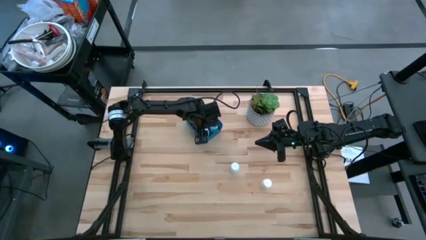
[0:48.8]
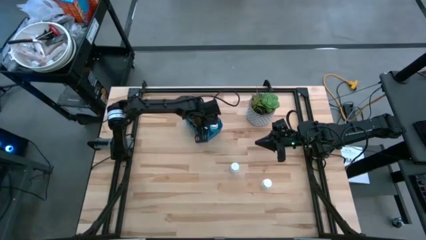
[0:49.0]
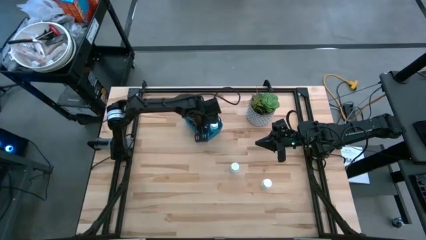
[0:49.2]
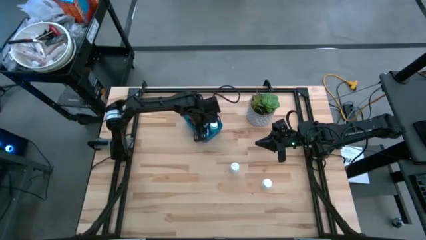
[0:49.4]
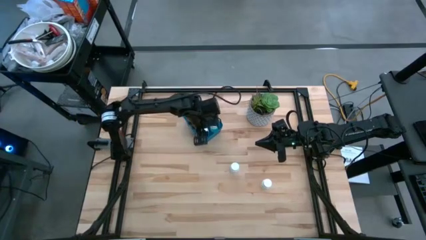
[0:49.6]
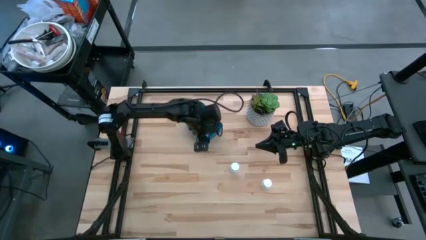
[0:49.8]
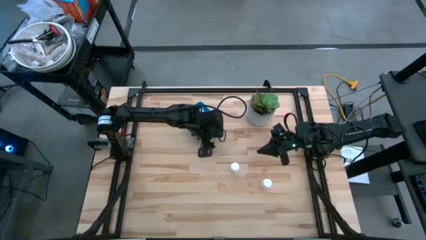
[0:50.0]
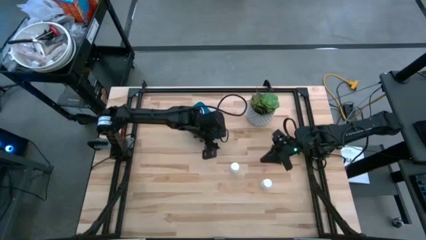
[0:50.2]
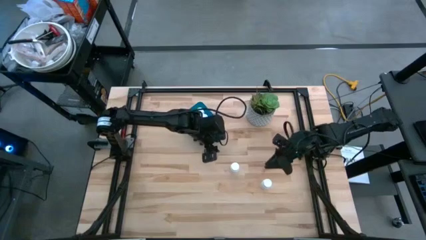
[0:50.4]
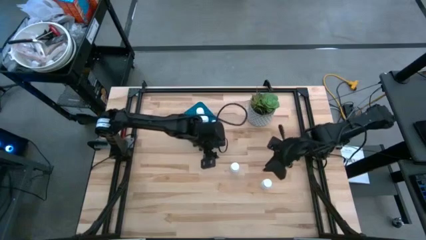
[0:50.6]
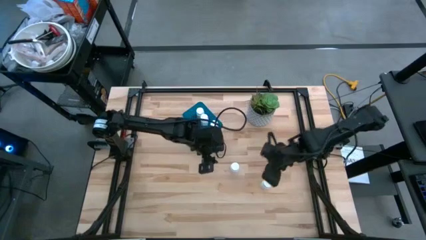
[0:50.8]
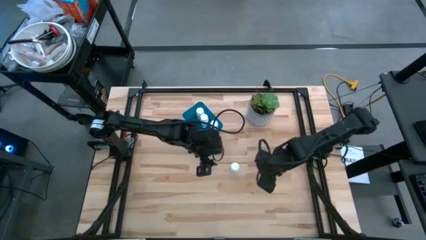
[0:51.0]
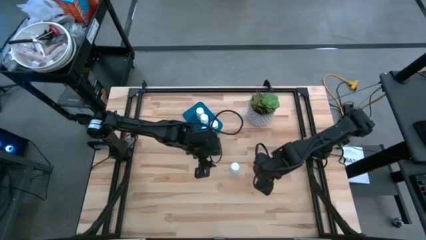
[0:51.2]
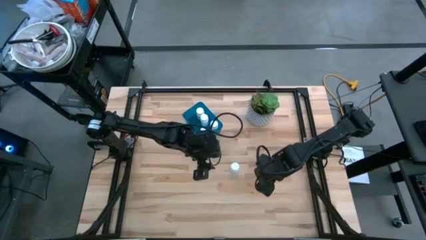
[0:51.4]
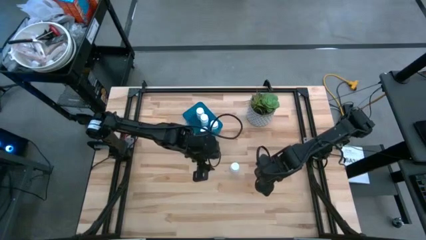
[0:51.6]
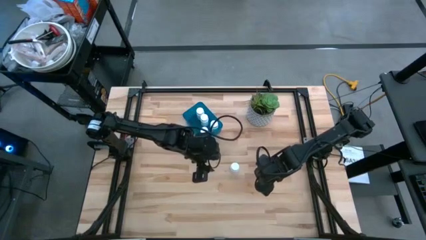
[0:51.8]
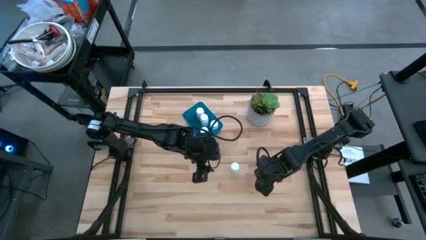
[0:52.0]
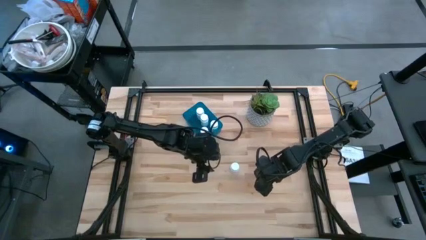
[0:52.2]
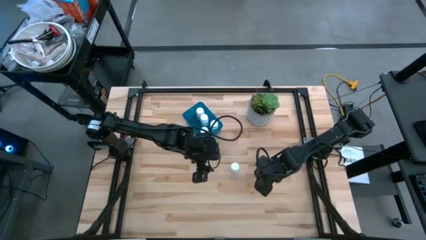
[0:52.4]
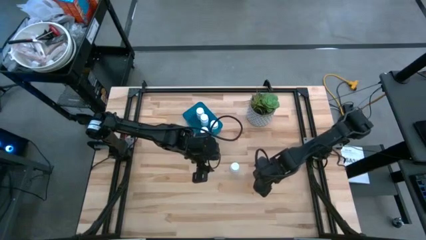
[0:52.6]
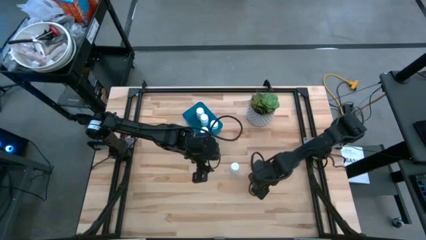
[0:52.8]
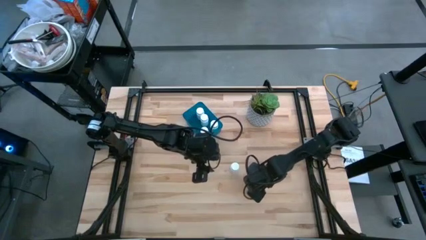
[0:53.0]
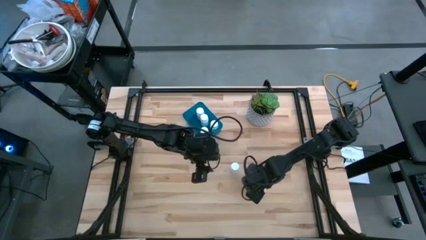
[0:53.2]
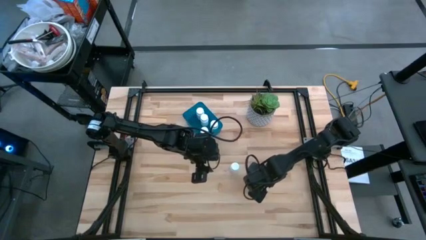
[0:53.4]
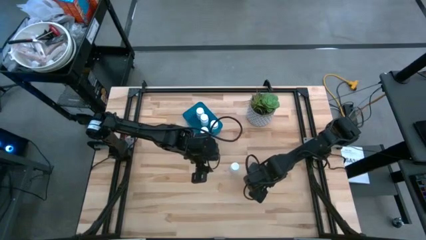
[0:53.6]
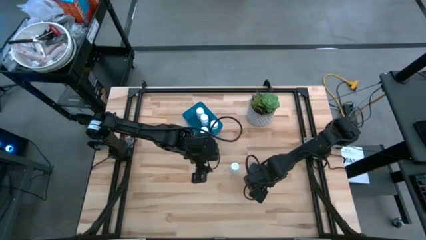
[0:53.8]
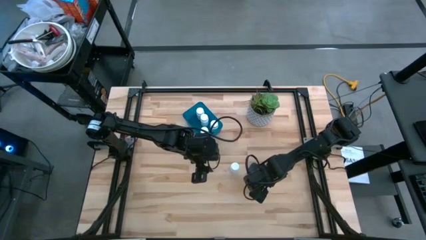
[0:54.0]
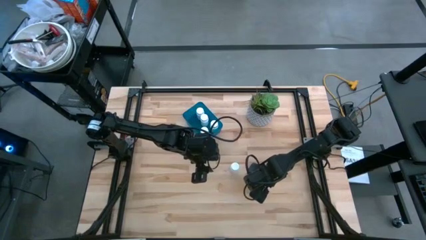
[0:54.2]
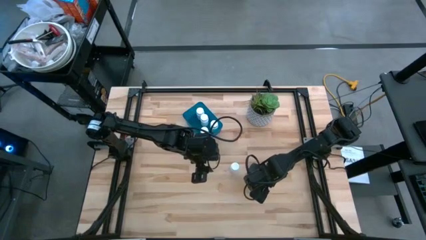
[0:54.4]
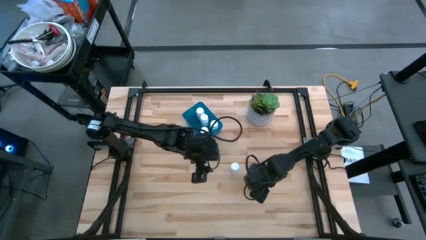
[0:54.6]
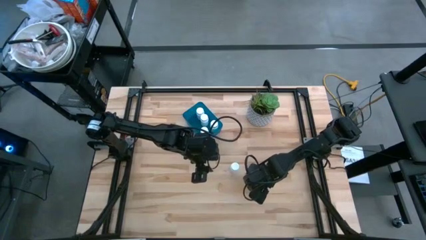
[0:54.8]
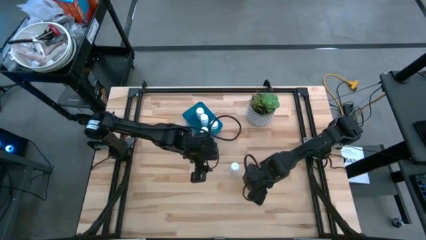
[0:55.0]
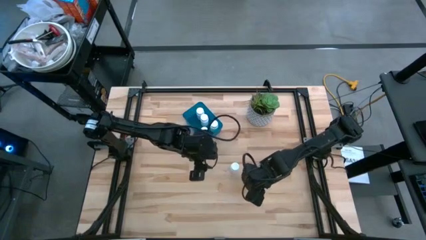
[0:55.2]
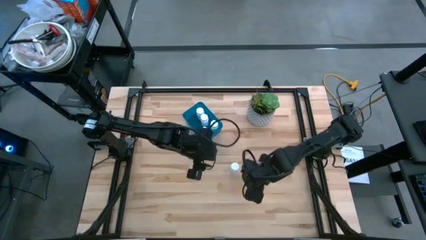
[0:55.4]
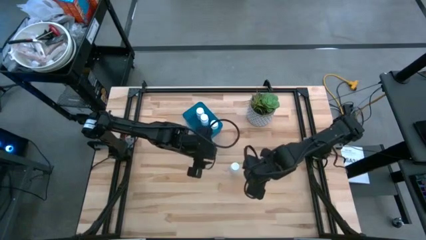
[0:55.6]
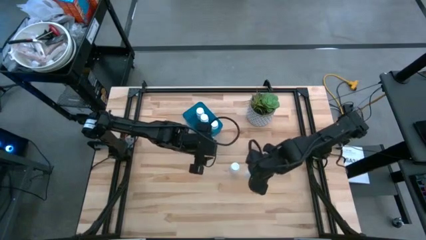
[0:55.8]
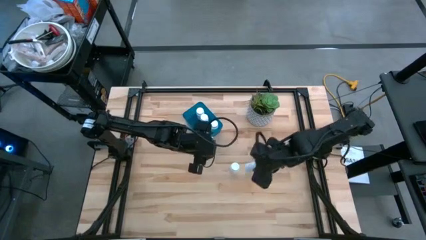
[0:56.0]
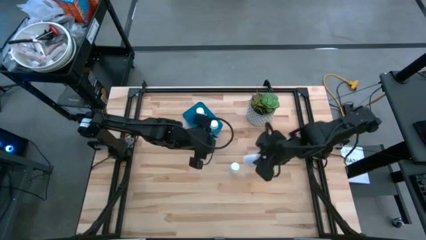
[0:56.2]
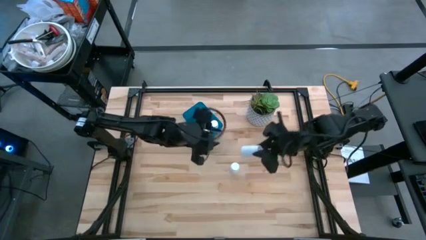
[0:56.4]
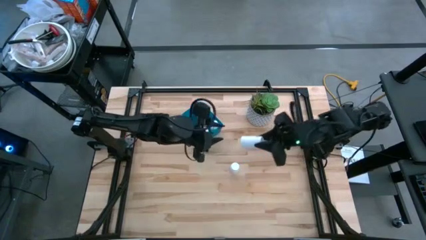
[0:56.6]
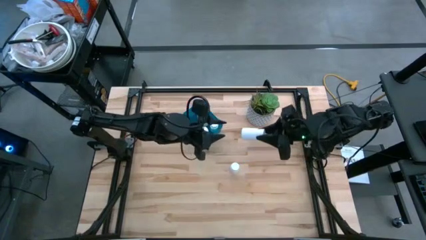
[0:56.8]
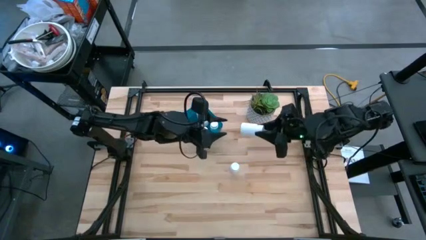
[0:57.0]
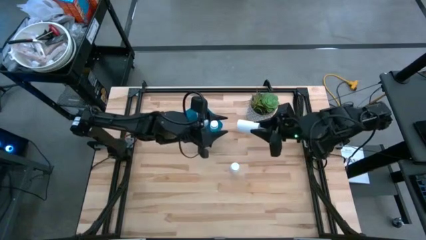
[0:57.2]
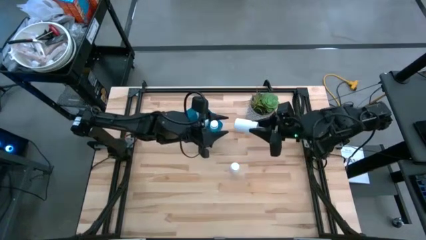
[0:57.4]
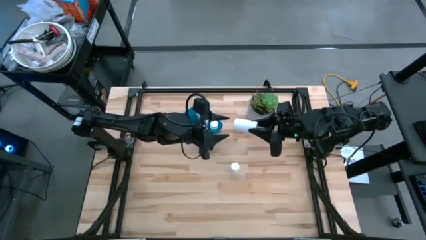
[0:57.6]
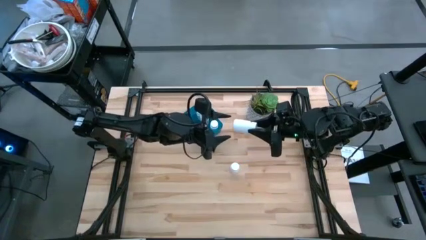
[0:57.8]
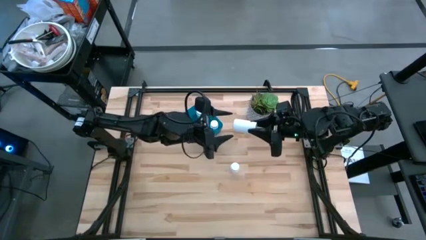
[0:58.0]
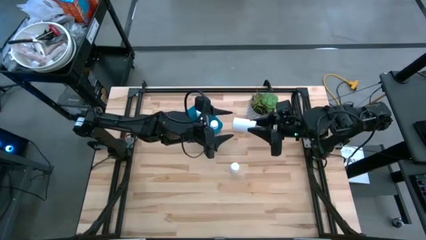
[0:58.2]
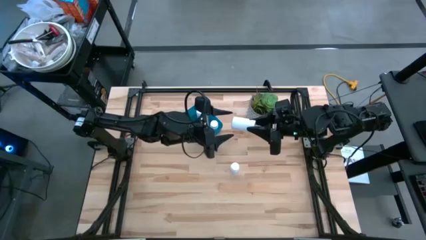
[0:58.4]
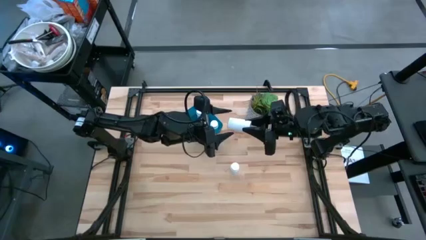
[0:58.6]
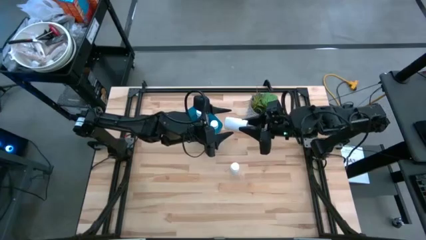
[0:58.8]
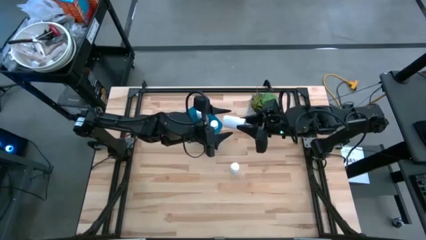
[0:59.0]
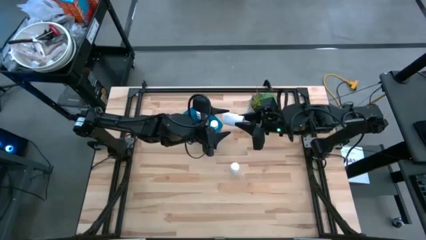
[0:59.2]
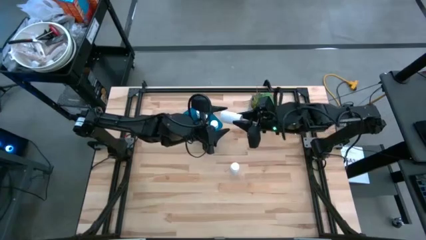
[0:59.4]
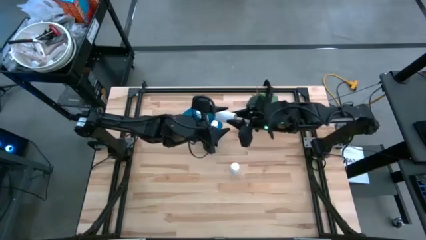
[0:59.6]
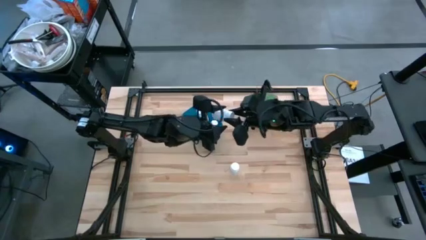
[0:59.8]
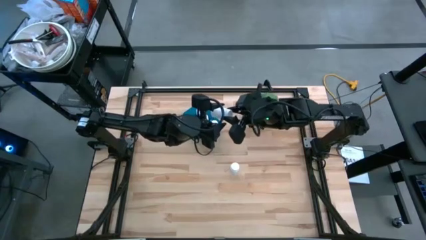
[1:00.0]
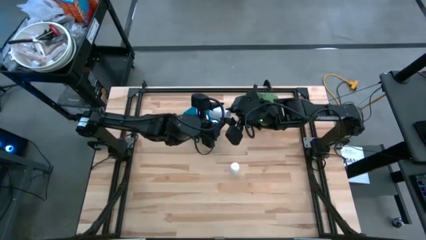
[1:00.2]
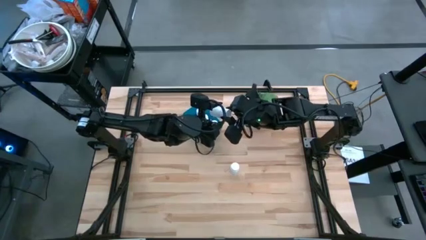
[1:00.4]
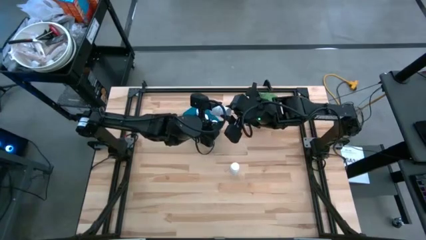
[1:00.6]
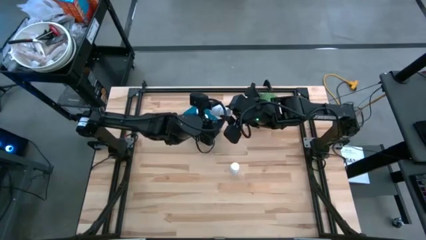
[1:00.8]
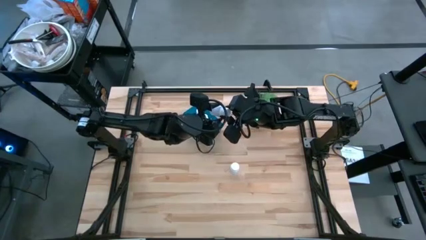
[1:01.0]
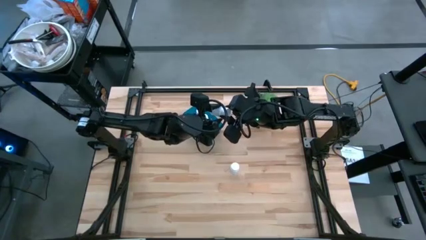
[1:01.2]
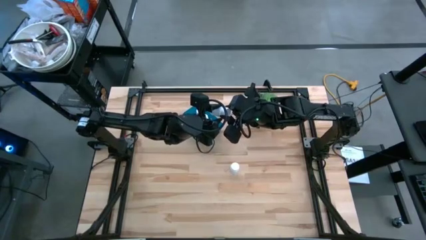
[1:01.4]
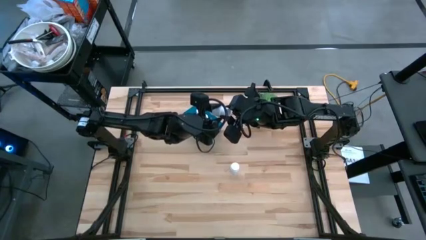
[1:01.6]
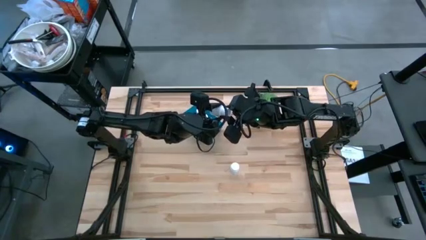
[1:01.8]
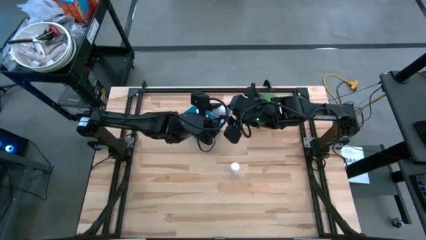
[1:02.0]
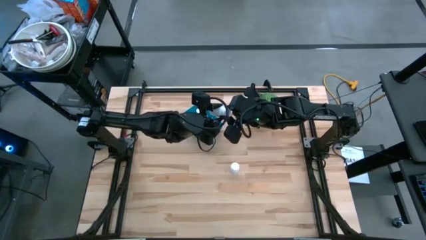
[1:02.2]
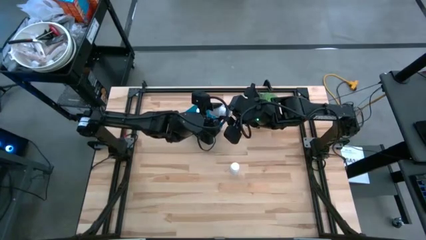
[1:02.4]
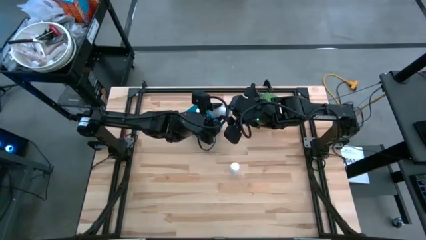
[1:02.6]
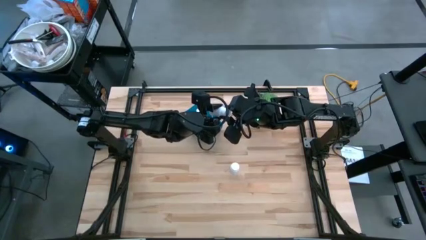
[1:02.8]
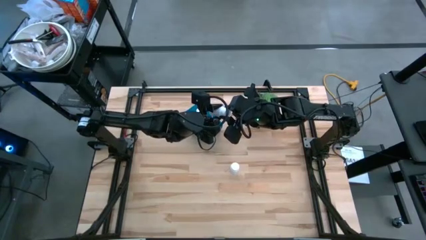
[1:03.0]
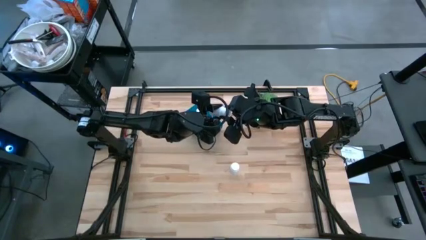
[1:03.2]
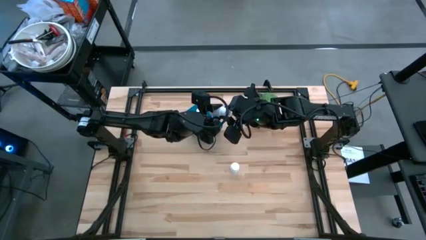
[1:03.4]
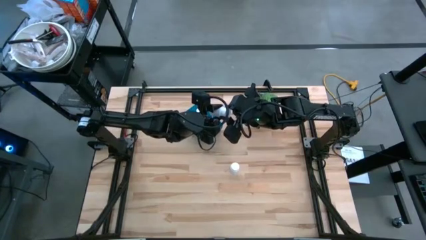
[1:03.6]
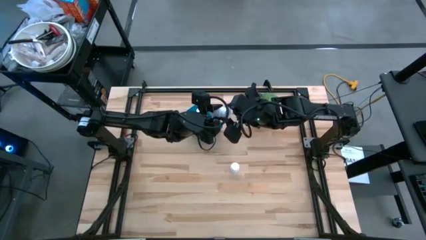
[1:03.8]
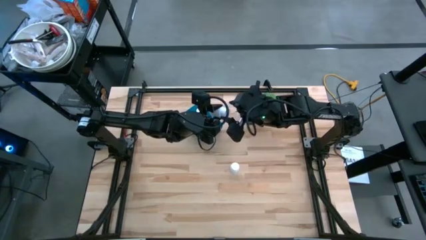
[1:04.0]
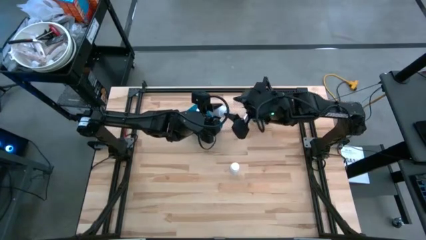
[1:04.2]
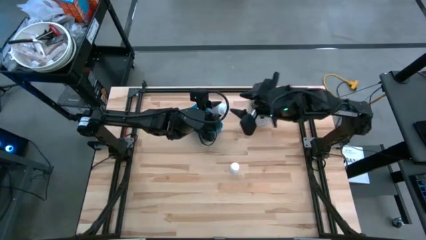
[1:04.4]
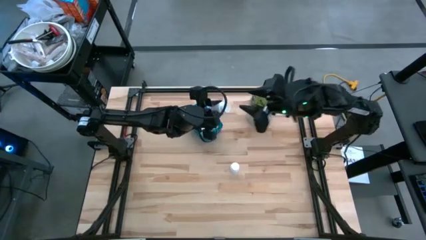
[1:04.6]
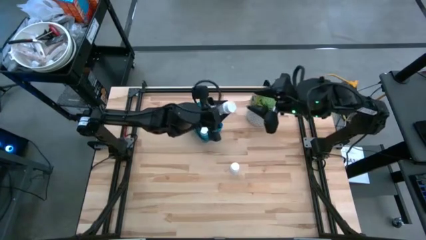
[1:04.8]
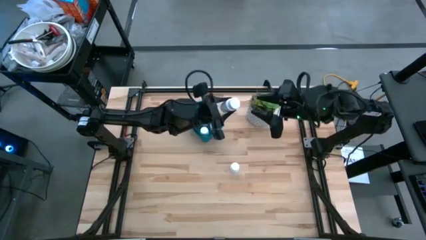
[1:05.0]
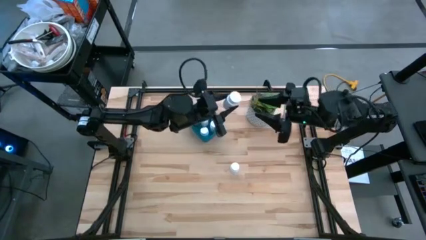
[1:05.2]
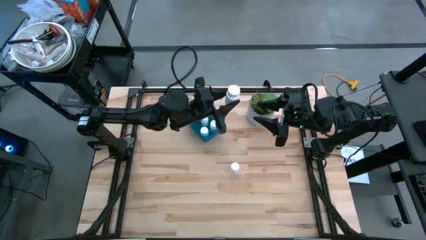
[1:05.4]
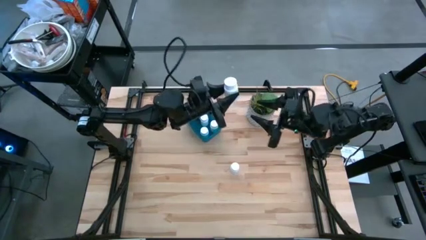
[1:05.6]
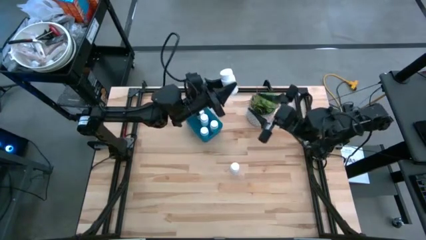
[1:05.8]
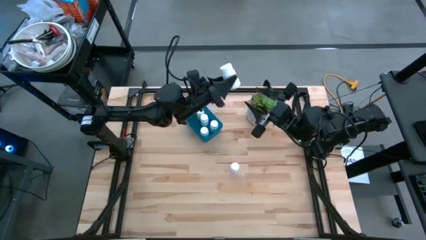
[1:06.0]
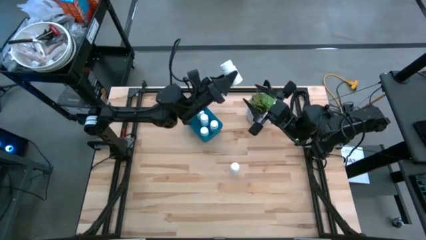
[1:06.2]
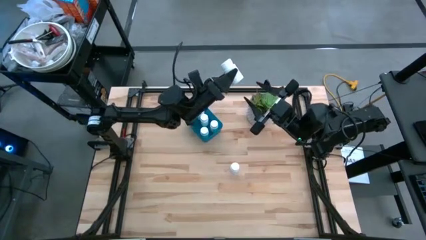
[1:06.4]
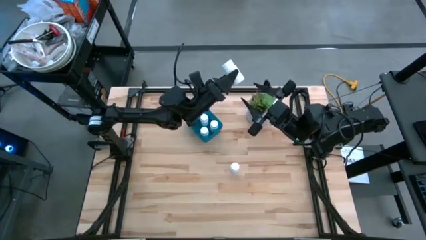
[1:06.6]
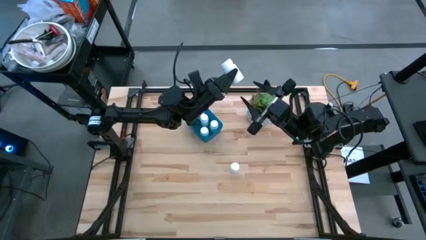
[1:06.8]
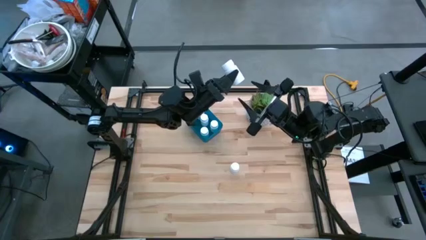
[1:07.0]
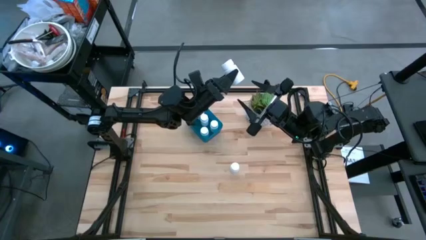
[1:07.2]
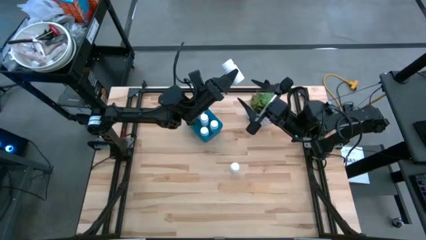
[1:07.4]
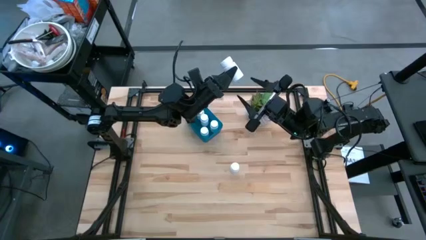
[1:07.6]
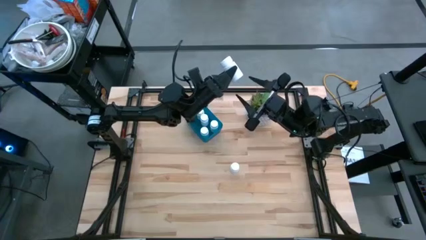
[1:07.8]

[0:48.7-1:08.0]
Task: Pick and place pill bottles into a basket
Put the white pill bottle into the dark blue bin
